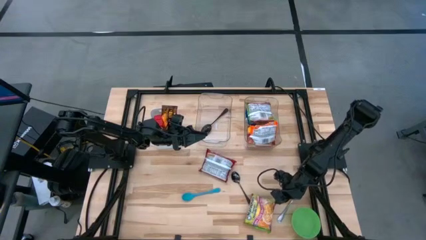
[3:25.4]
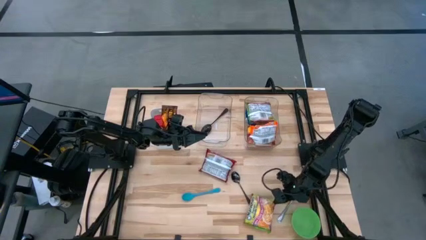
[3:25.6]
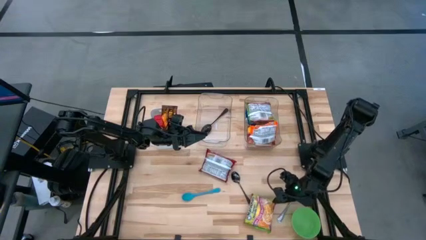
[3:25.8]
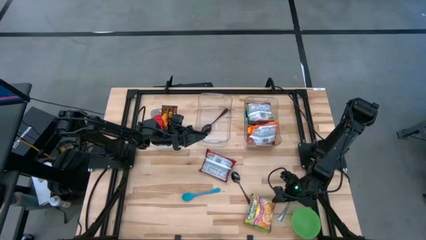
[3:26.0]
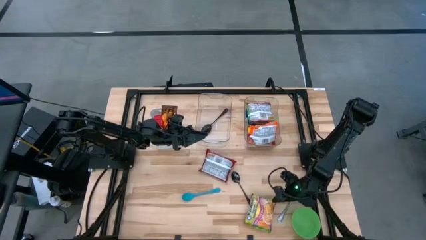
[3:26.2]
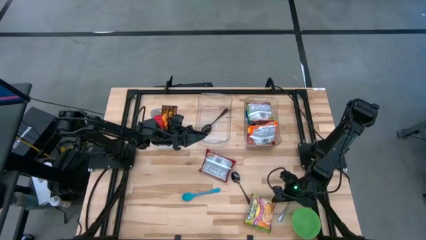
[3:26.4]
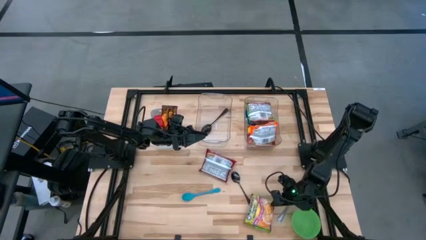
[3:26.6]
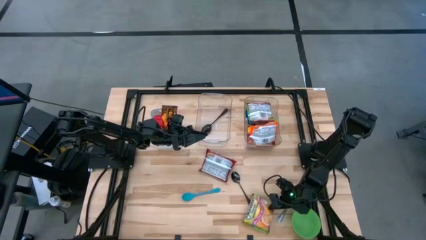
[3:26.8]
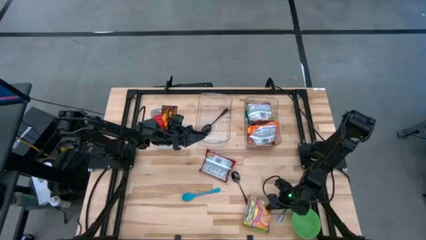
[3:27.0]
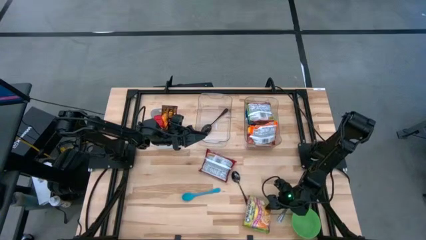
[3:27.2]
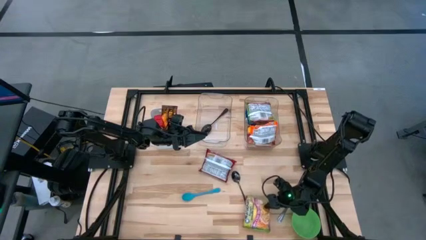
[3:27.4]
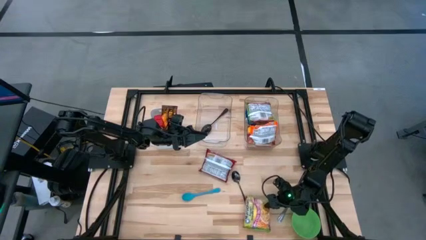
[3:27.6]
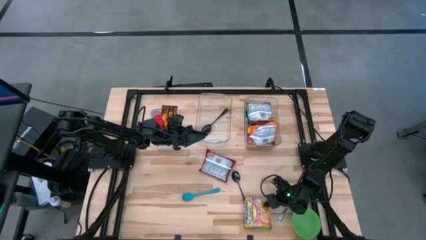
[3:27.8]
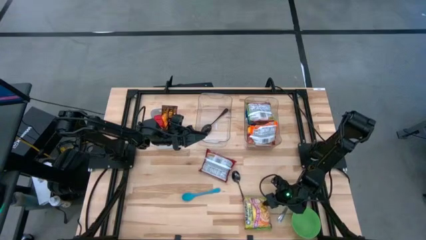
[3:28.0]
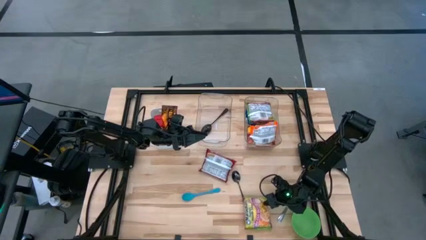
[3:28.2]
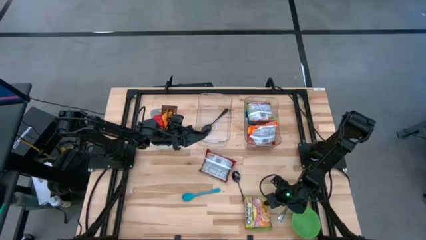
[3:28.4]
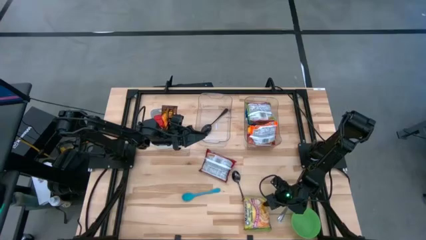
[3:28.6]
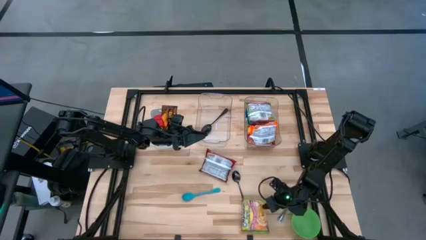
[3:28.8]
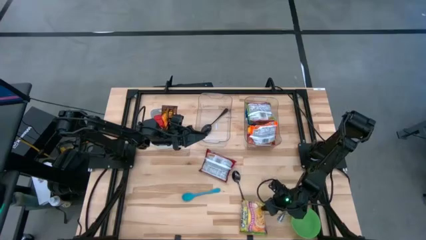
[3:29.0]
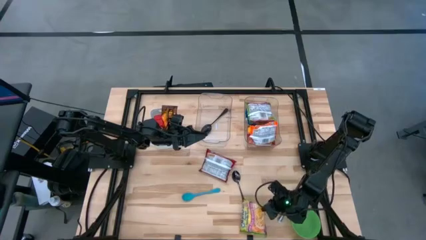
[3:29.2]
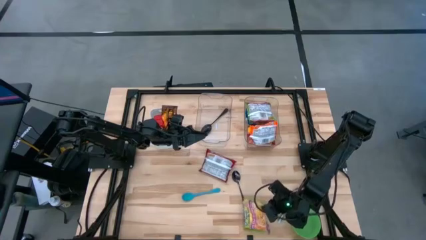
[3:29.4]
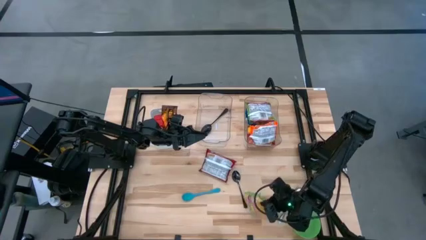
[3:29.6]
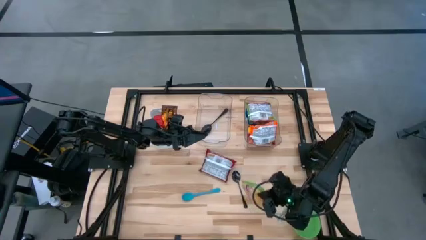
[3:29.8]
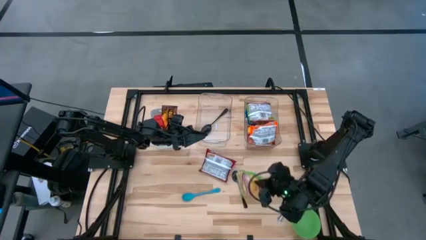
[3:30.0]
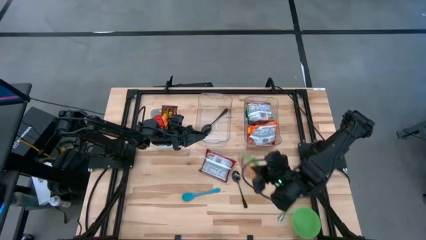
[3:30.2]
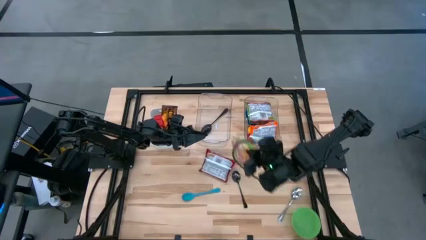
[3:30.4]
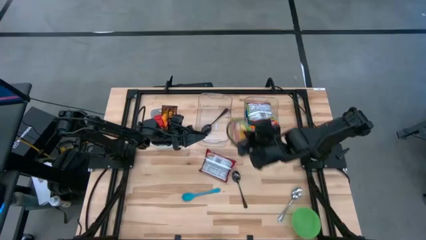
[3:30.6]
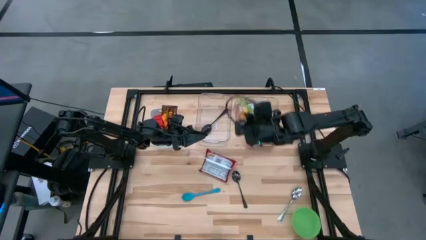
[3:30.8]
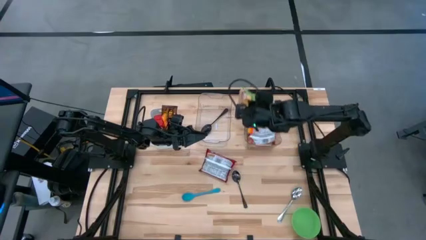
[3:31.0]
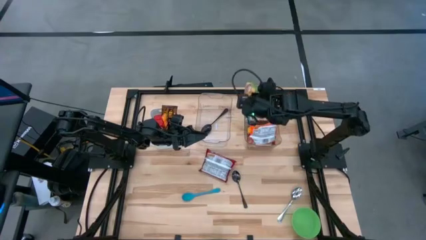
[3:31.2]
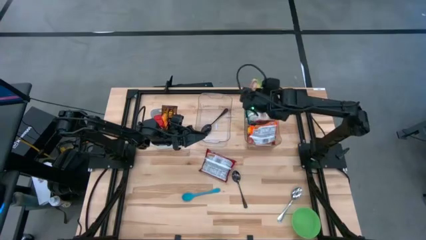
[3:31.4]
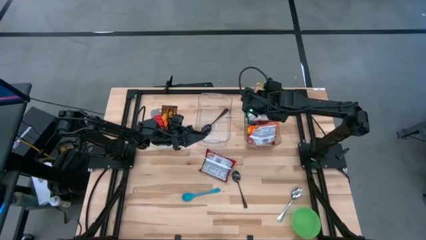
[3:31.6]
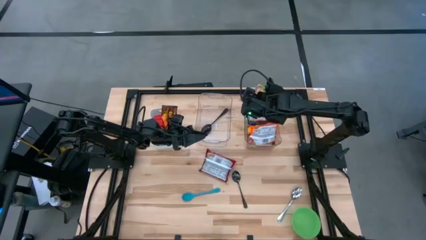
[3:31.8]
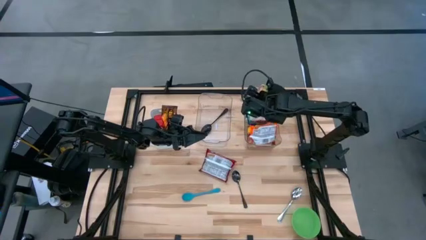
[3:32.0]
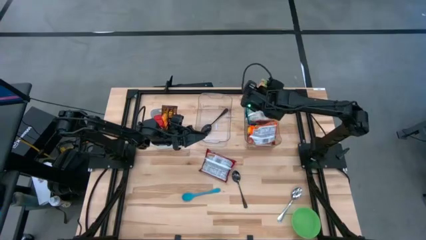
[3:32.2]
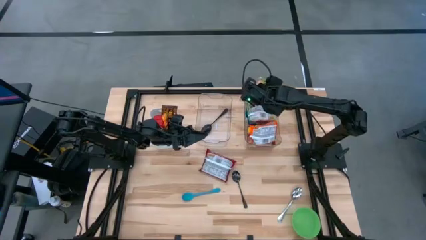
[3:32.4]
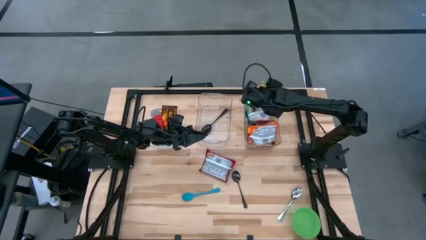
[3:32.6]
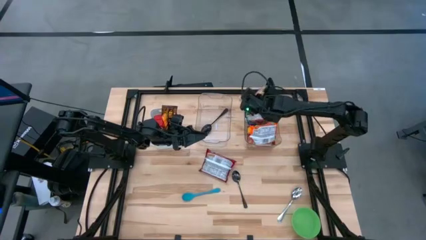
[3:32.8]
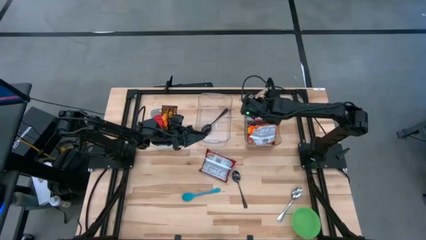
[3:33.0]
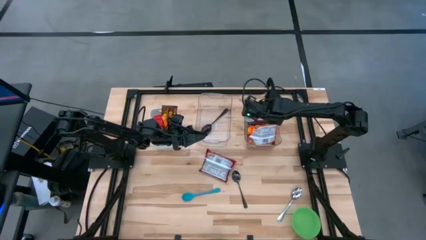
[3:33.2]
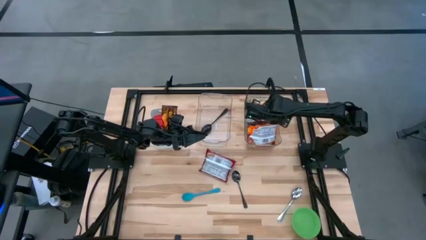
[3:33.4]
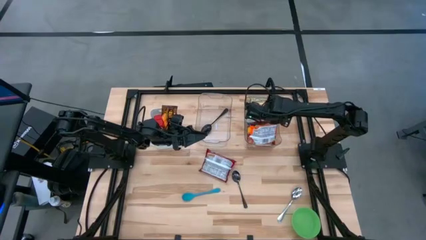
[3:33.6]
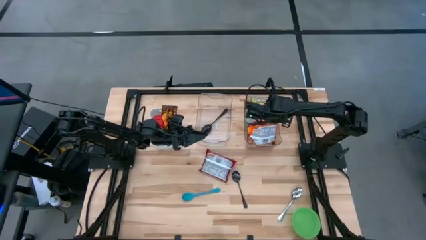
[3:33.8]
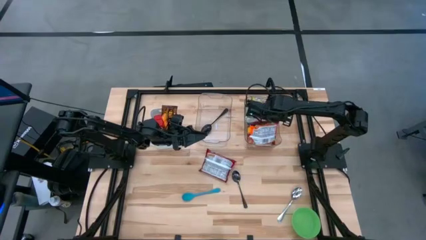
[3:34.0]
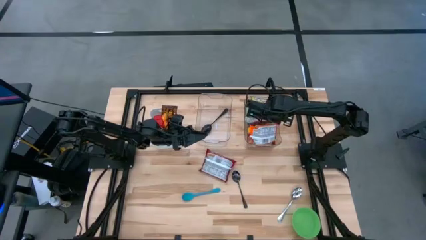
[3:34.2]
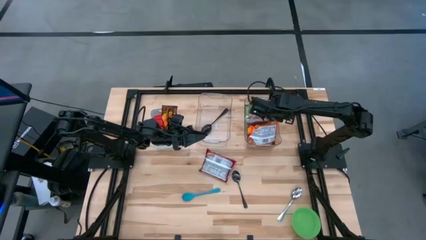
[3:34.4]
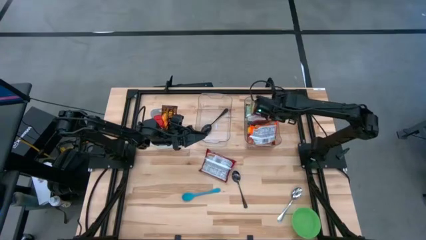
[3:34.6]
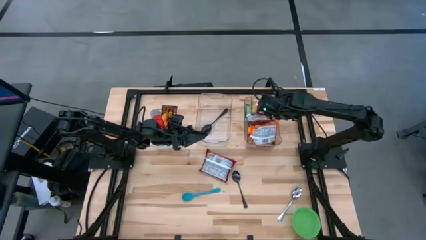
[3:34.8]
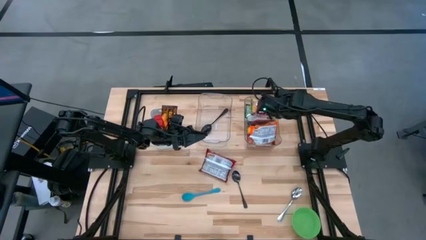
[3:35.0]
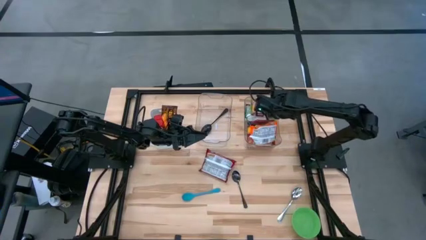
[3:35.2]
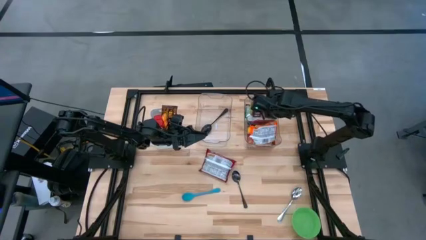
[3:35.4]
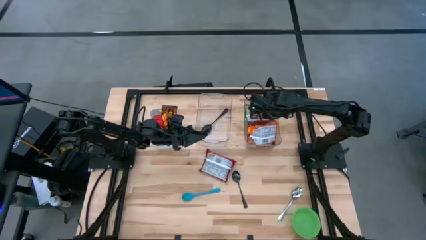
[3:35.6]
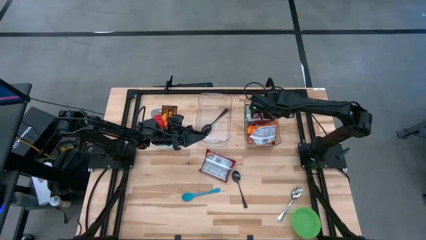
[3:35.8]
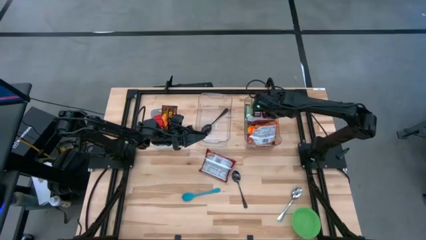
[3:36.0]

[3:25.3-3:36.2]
Task: Pick & Place Food Item
Put the green noodle pack into the right transparent bin
